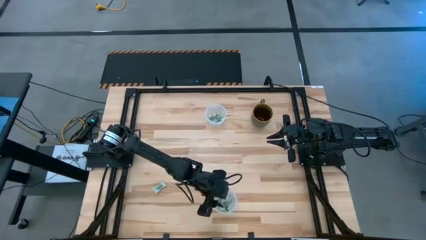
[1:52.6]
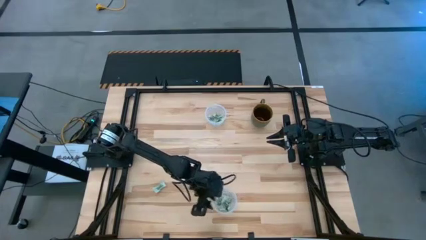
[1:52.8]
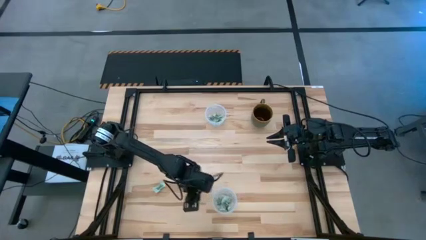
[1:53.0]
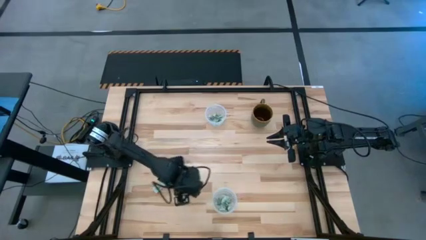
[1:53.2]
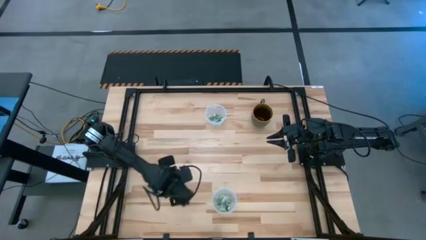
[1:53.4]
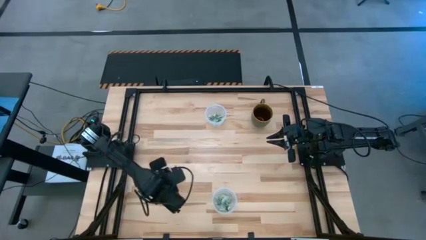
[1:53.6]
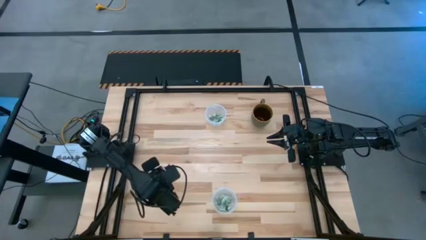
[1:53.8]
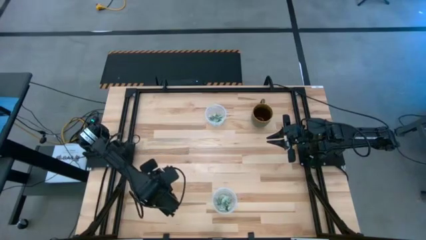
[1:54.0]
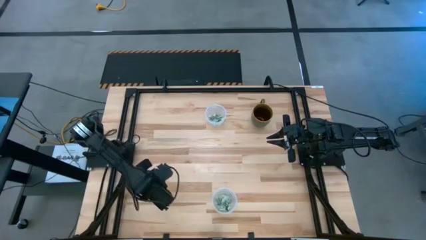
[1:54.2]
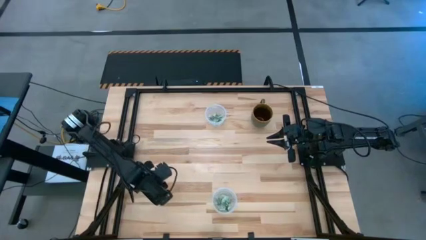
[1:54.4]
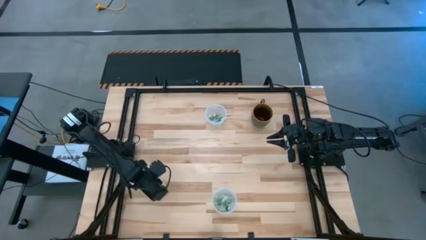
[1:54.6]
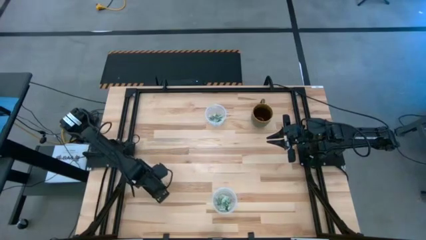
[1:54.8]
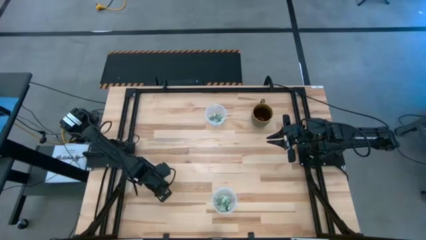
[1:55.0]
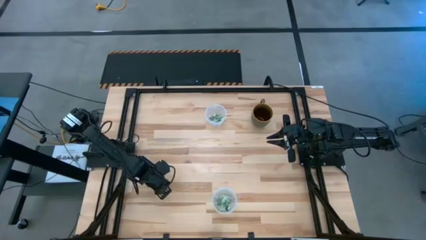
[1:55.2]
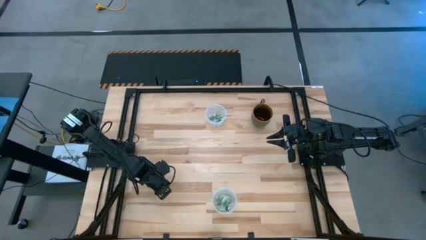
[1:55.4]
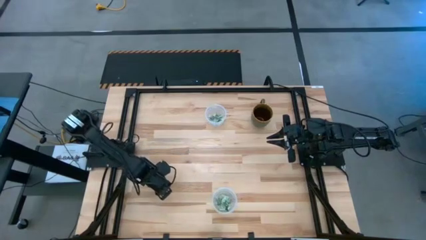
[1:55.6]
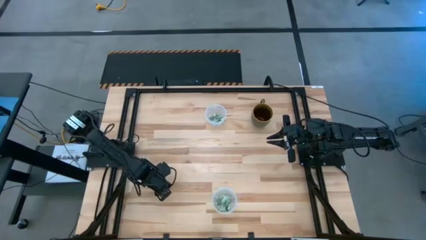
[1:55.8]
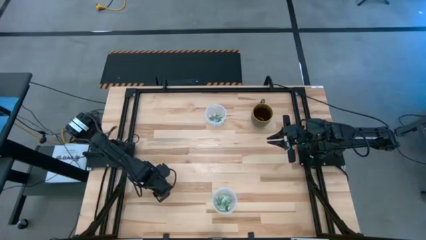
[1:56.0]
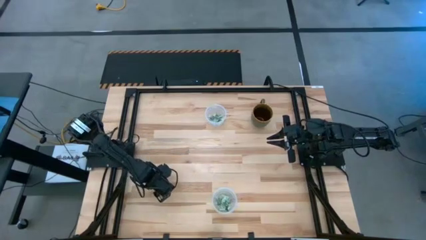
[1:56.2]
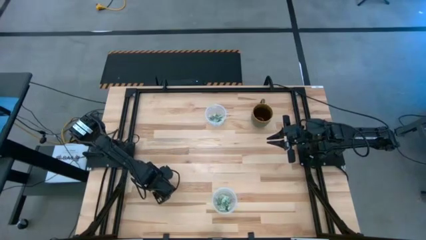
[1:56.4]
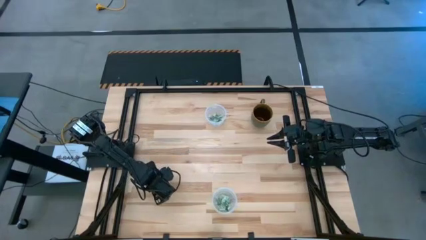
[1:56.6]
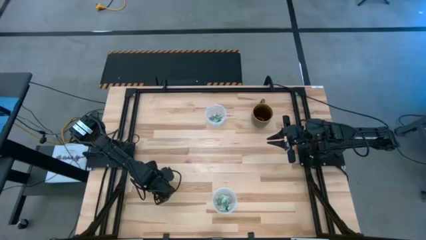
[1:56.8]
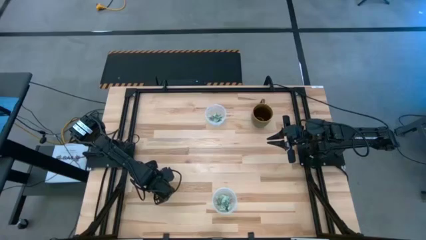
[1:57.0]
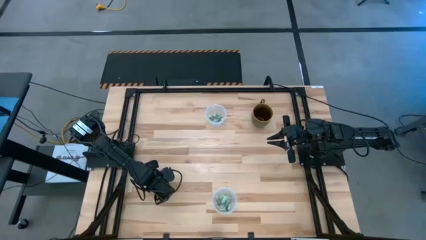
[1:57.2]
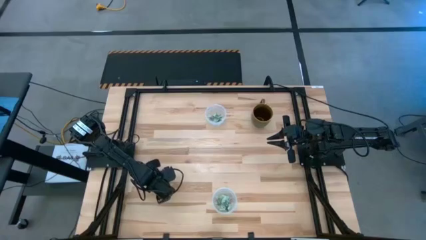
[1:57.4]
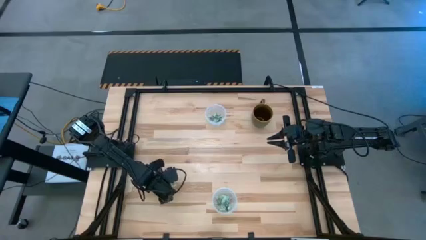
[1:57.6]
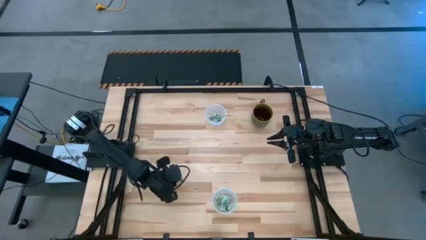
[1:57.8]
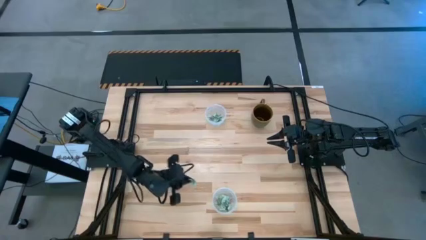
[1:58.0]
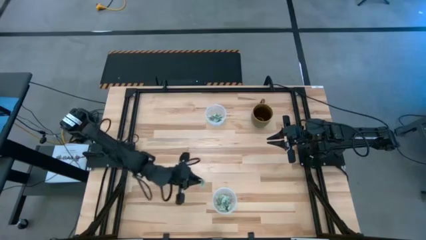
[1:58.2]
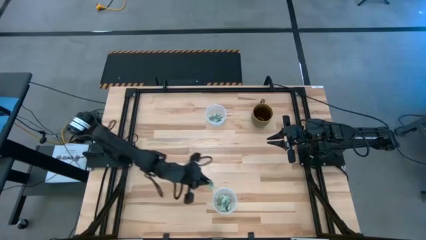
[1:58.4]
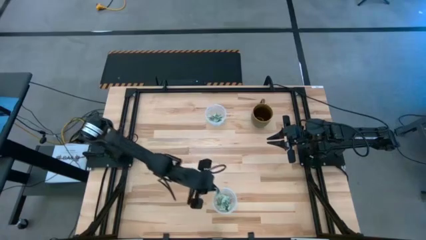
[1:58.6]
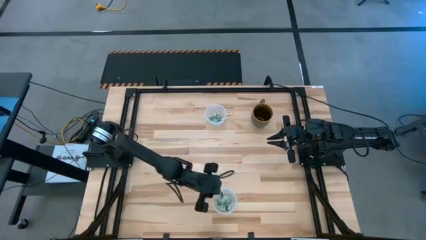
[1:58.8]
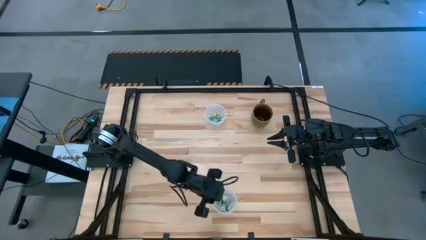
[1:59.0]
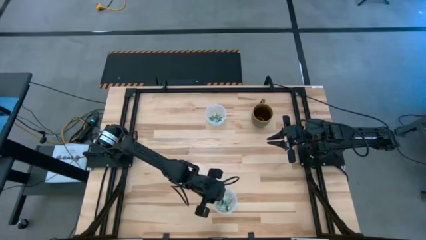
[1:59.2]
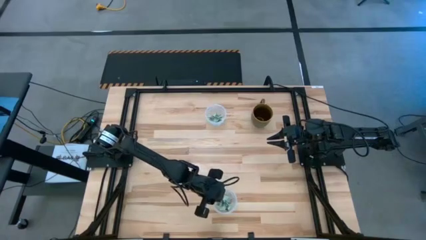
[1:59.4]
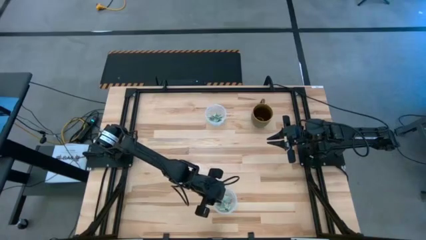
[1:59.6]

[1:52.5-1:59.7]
Task: Pick and place Stevia / Truvia into bins
Put the stevia packet into the bottom transparent container

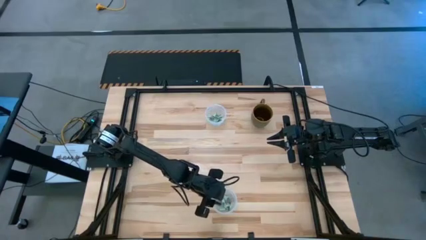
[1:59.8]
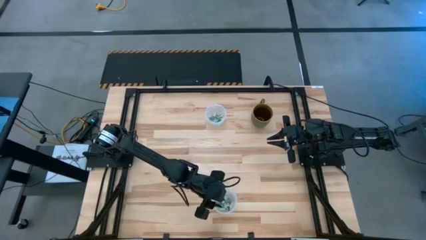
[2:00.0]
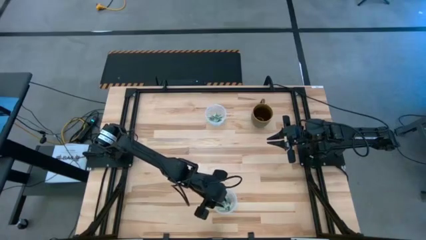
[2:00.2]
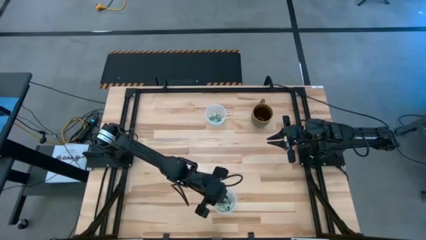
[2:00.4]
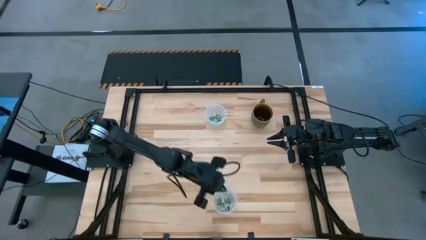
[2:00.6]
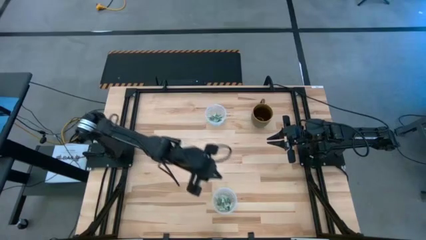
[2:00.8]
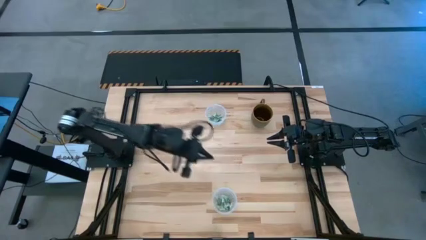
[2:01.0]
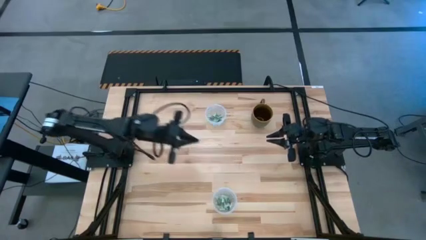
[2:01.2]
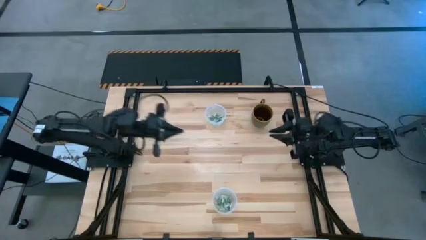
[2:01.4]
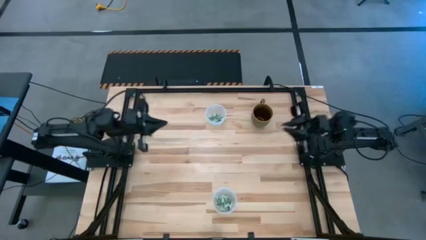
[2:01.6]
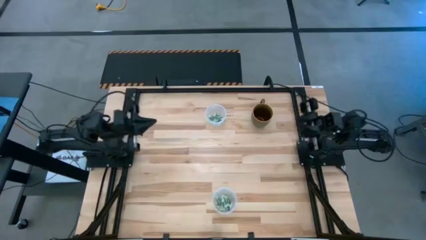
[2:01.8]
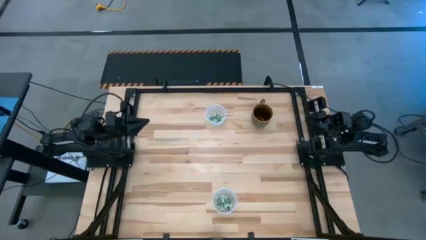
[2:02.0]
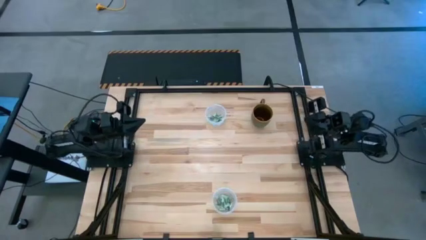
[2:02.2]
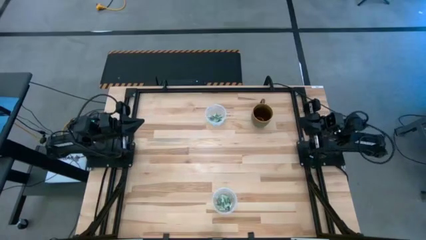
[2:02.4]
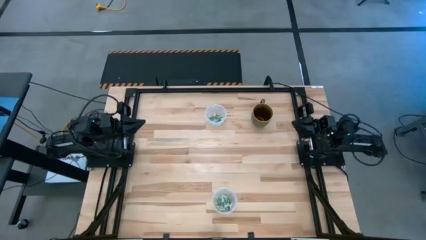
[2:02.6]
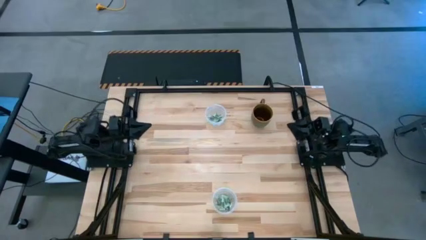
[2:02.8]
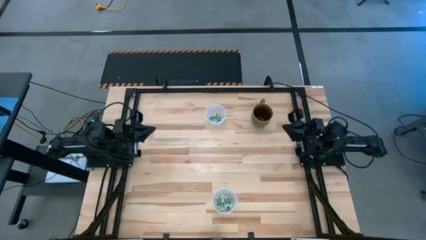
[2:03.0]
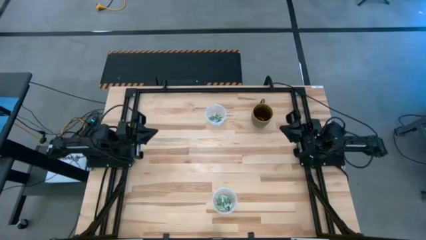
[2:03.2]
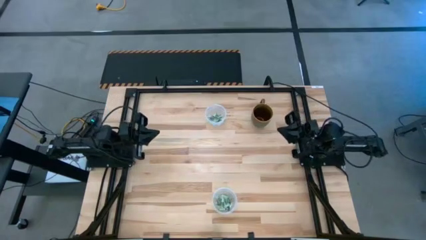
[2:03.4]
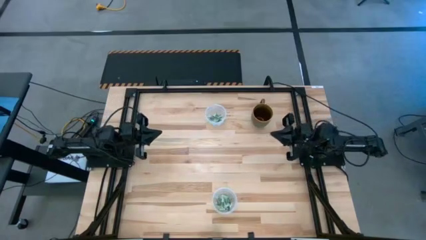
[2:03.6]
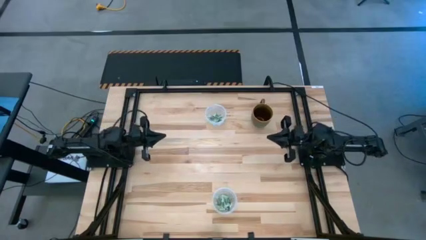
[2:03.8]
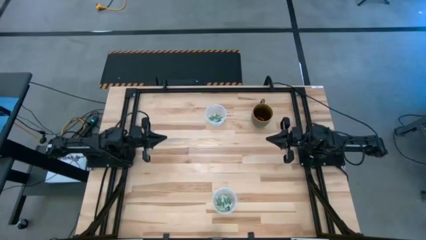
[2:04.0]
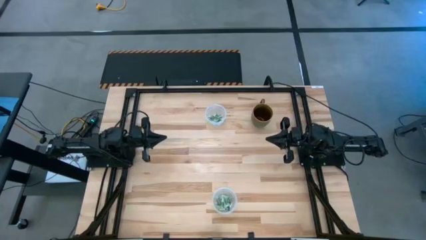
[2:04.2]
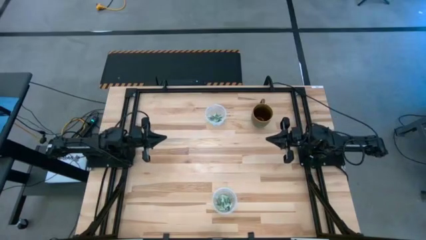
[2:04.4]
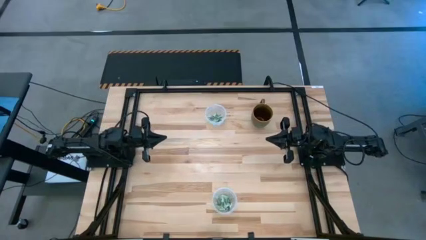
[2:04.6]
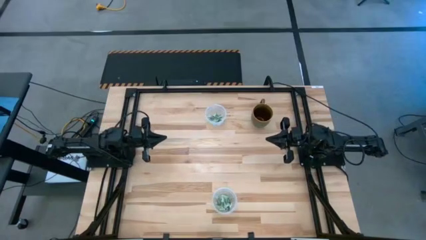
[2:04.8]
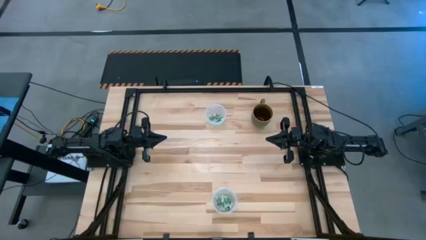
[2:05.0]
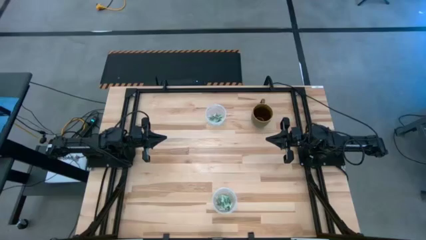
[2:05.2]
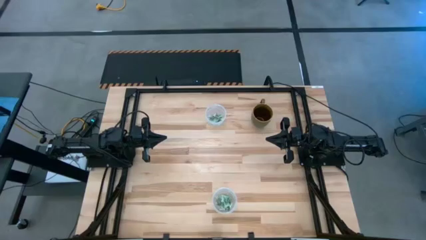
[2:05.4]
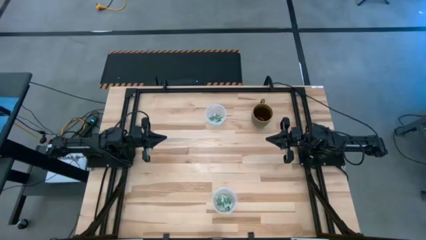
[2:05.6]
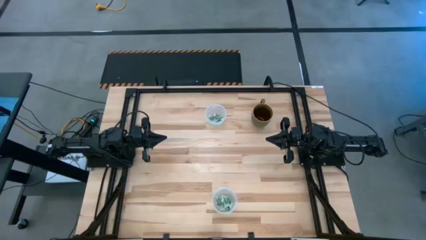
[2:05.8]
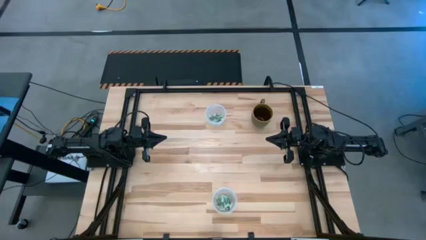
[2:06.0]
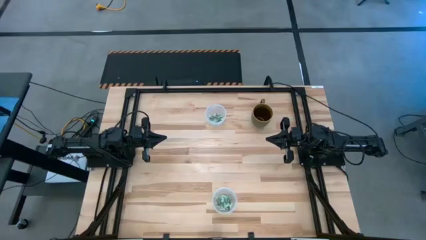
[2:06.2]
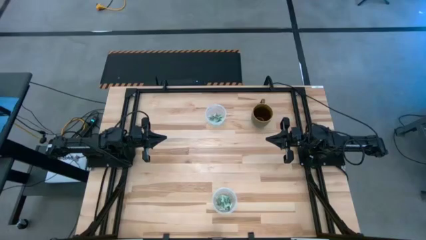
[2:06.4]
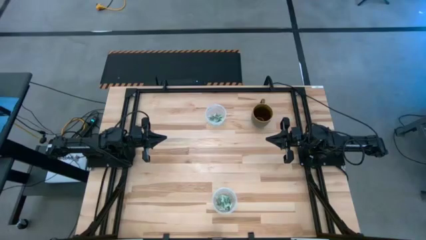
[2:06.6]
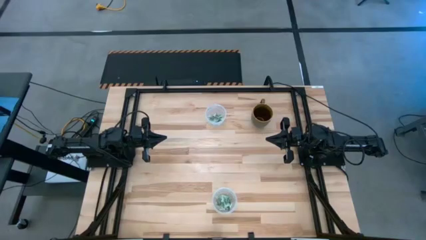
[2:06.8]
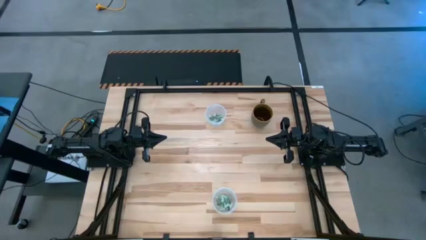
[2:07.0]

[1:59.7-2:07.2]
Return to Home Position

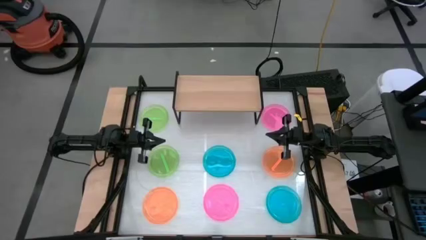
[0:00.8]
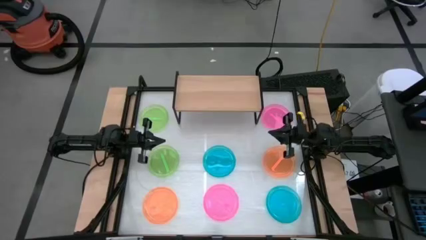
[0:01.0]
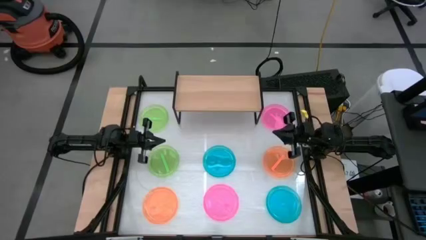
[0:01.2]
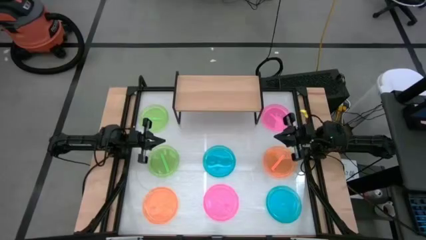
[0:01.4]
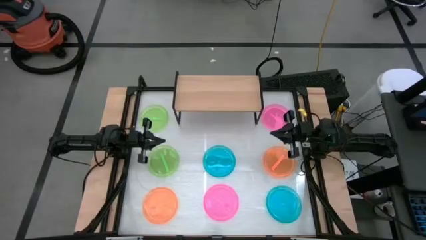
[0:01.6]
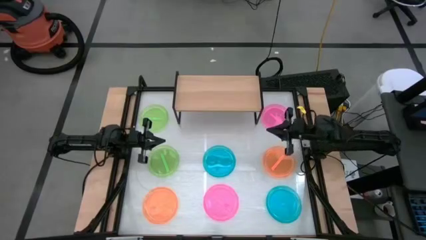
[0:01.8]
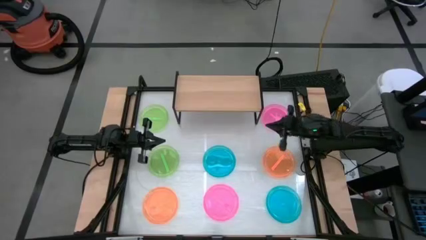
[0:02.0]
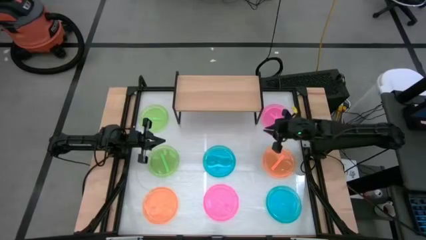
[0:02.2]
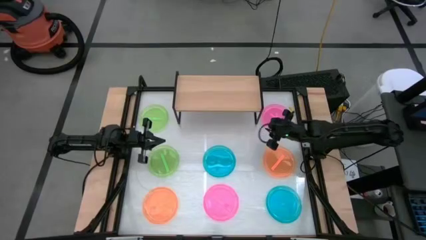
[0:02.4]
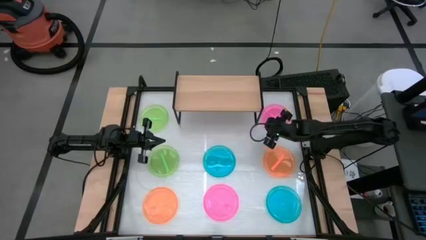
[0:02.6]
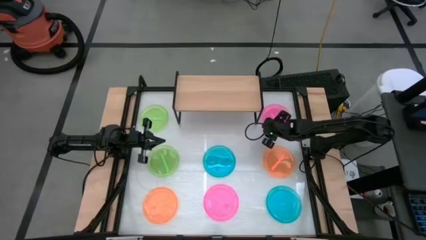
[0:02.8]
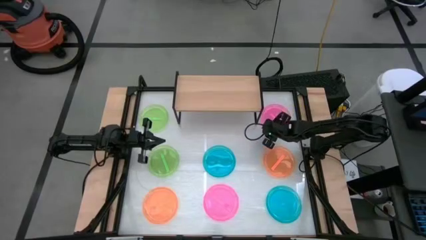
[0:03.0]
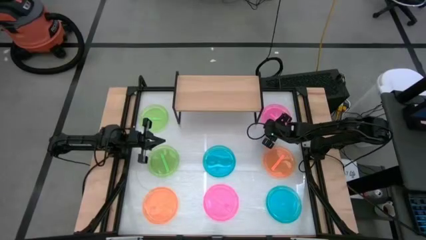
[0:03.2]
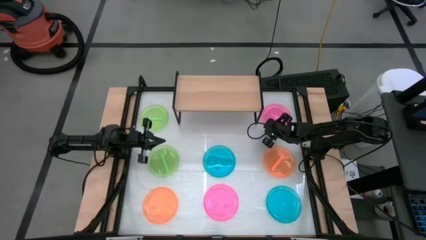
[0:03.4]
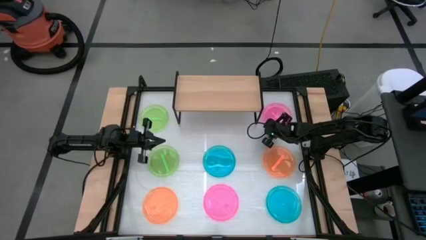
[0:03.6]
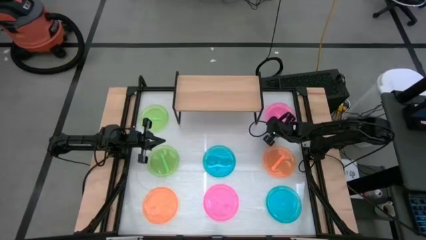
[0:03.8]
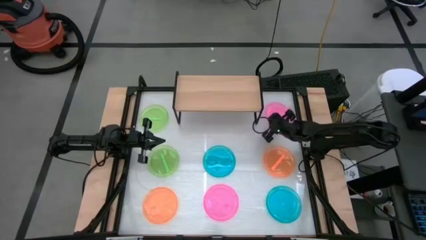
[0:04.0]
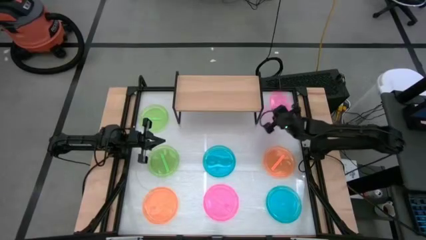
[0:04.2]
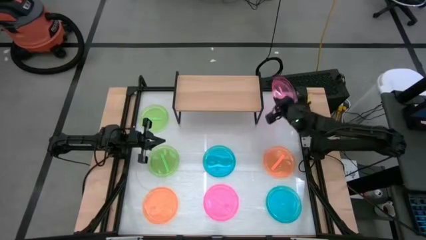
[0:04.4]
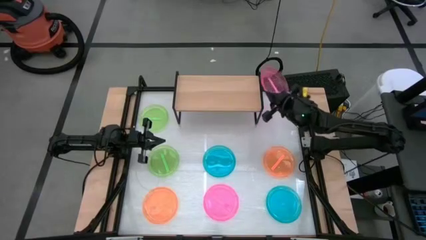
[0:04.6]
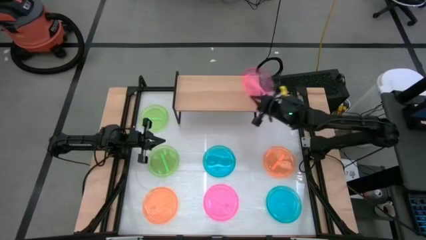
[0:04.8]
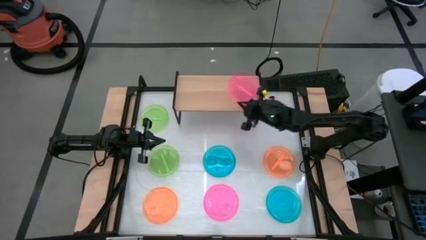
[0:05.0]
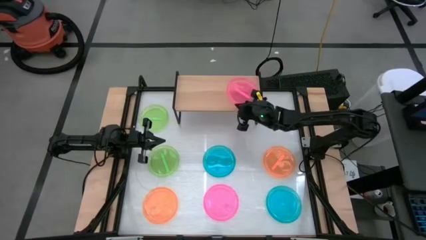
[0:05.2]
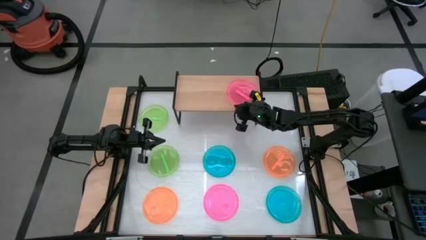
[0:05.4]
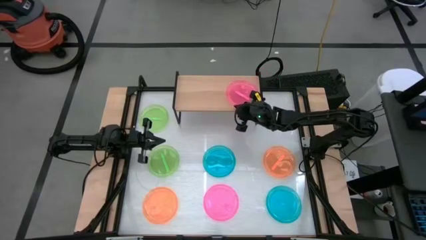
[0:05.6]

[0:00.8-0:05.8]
Task: Place and stack plates onto a shelf
Put the top pink plate on the shelf
